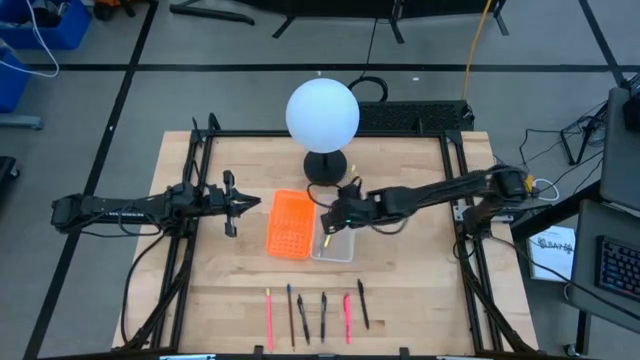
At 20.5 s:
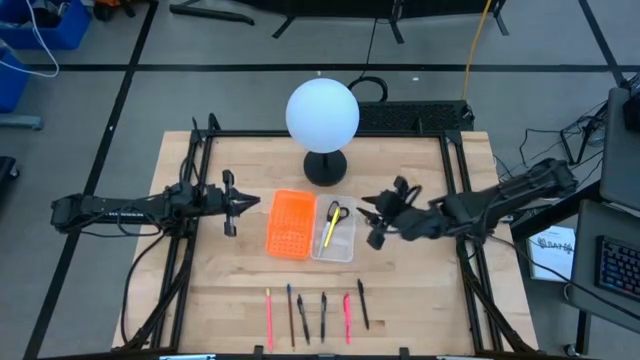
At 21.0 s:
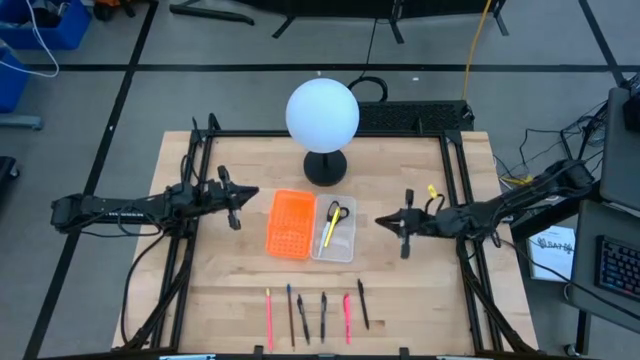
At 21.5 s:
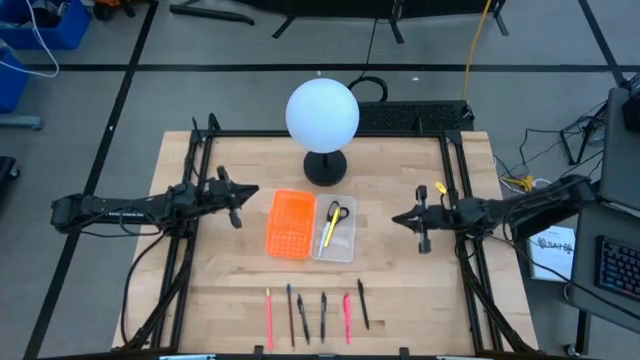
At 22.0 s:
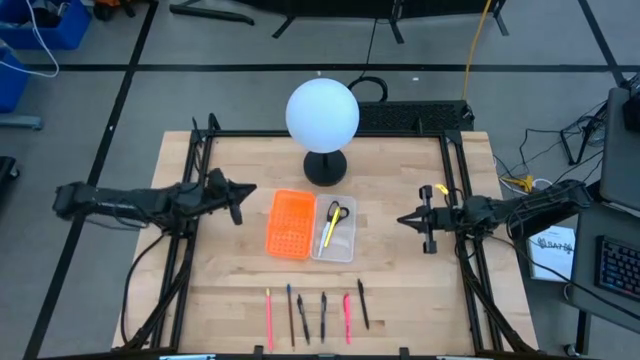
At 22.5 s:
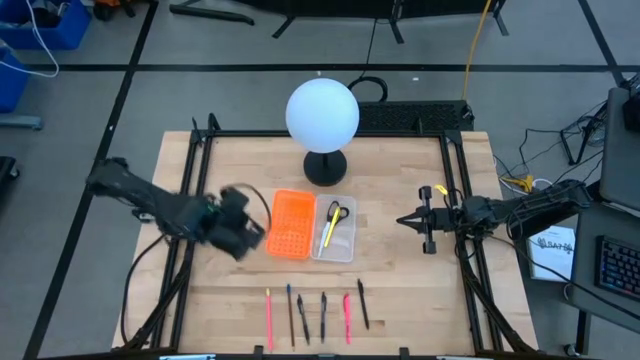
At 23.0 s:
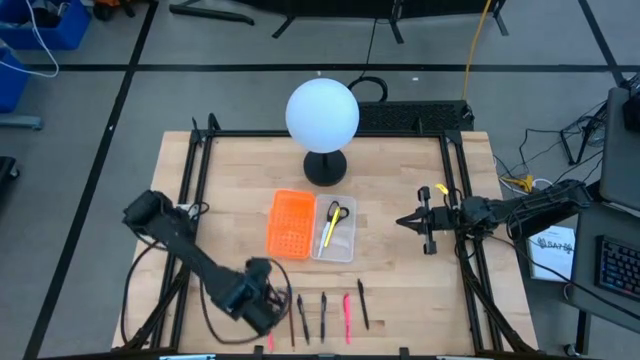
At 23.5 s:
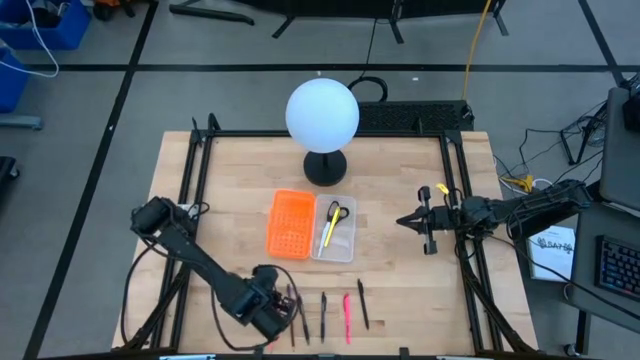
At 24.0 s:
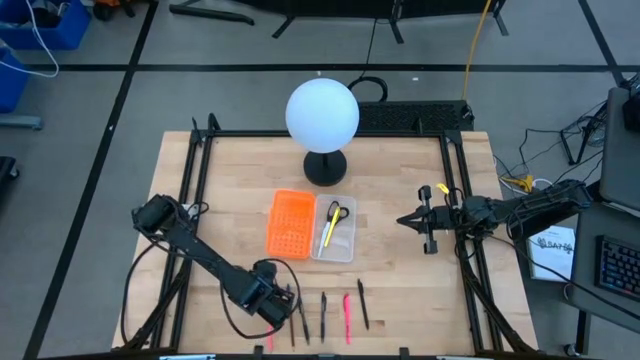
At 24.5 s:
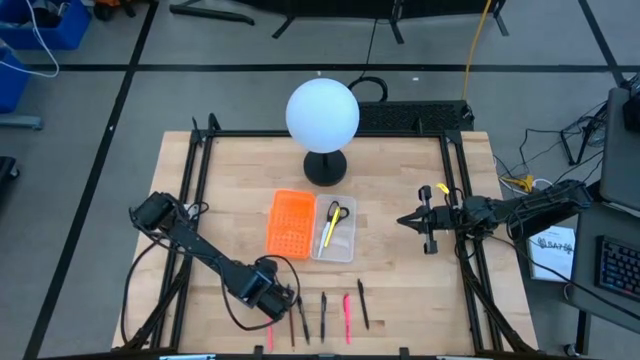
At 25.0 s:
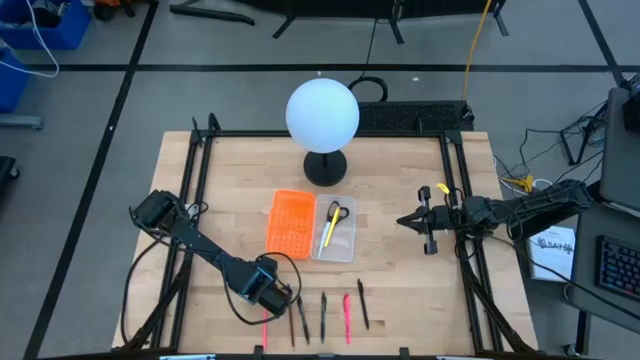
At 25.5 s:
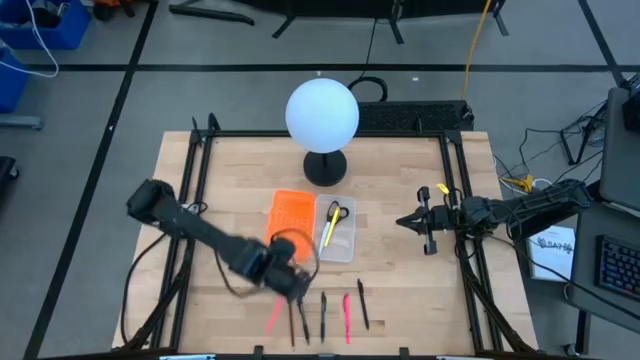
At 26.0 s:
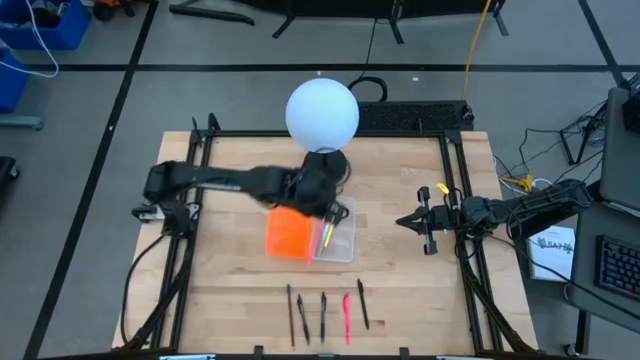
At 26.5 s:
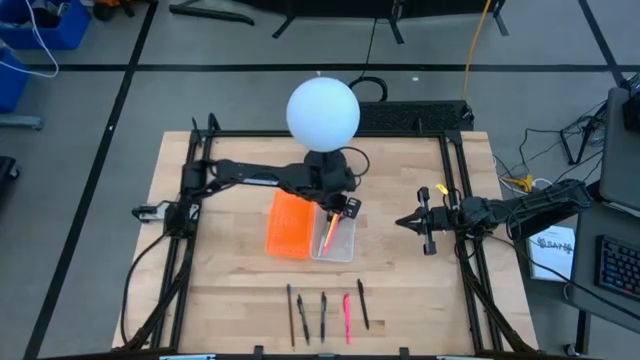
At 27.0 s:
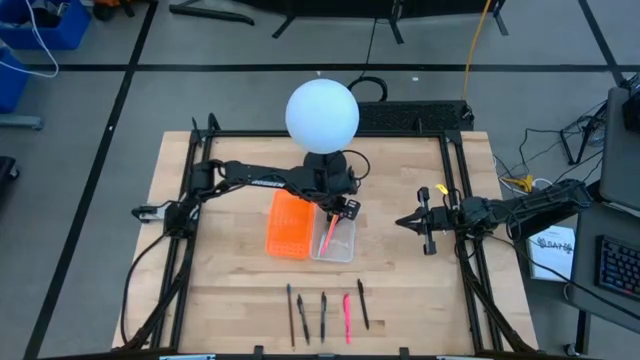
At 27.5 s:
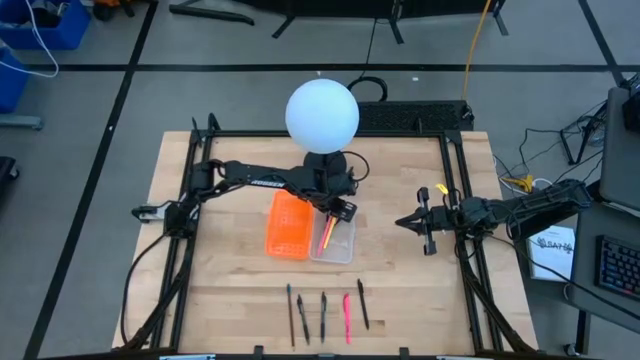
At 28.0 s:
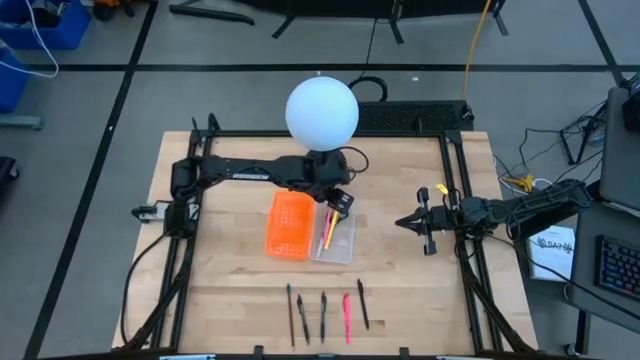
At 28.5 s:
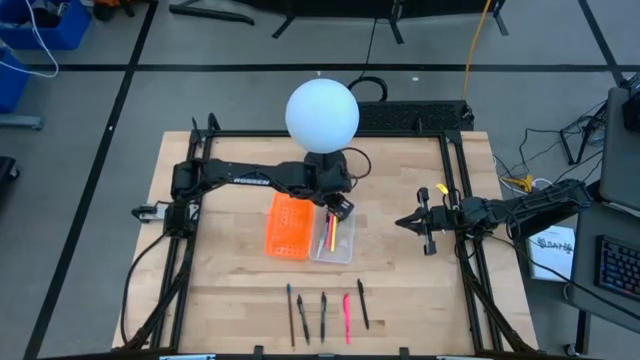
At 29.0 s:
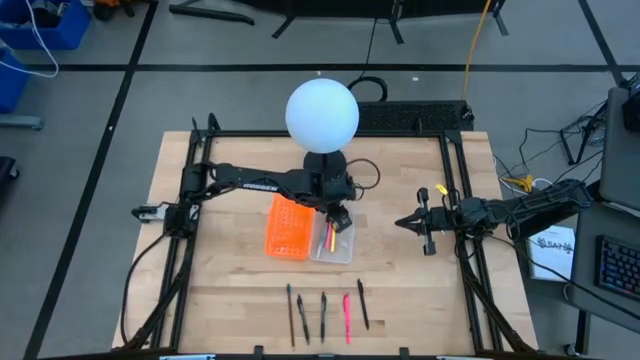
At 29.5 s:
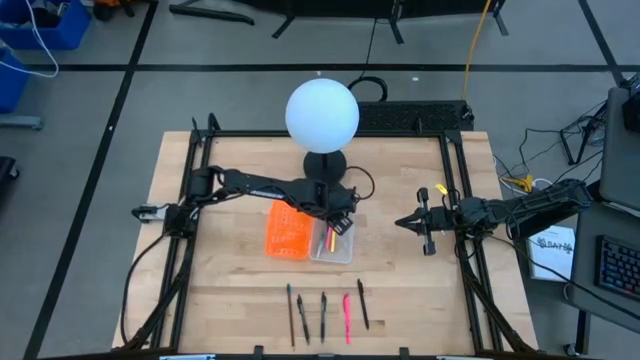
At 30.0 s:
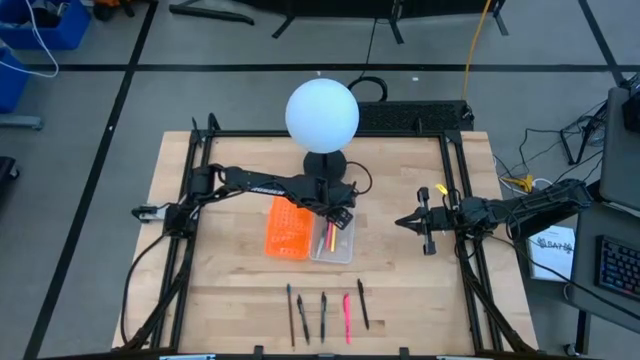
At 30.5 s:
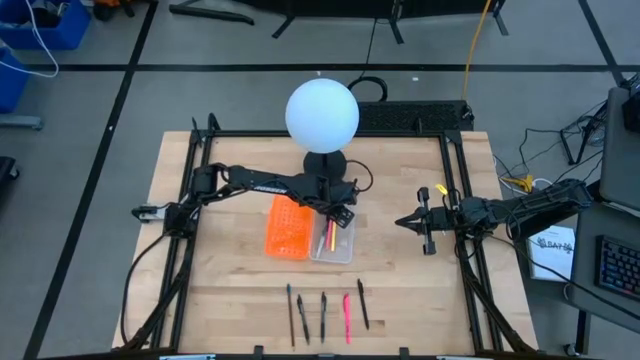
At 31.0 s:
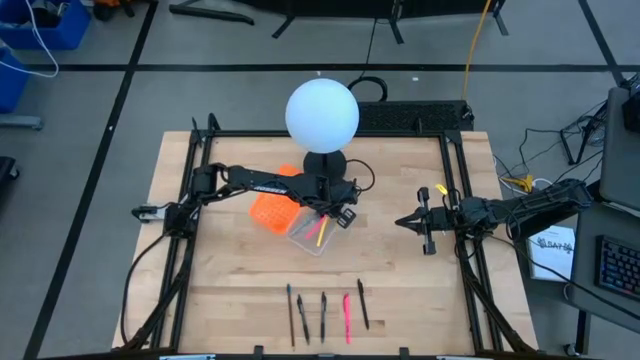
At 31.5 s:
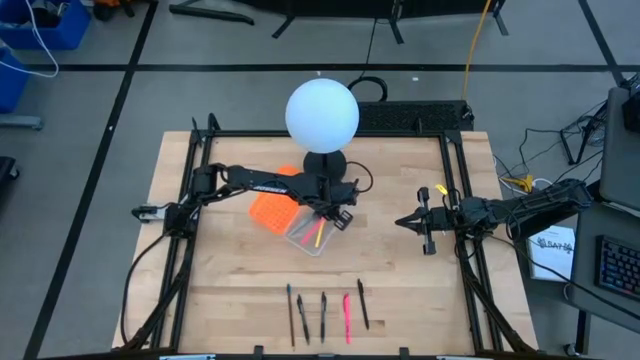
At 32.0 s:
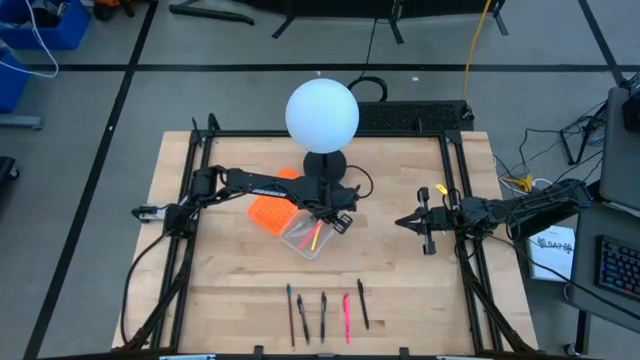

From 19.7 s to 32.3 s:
Task: Pick & place school supplies into a supply box
Put the pink pencil into the orange supply box

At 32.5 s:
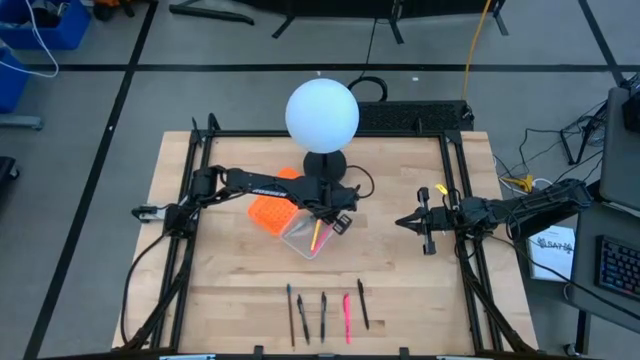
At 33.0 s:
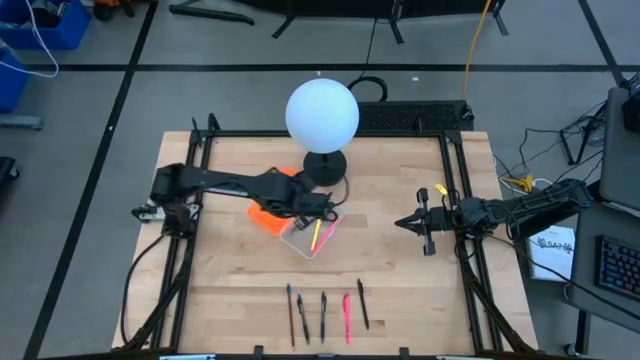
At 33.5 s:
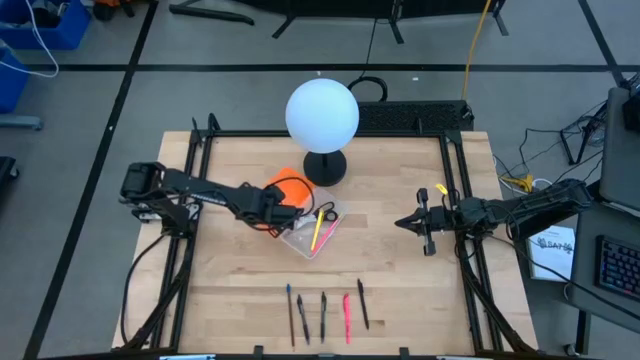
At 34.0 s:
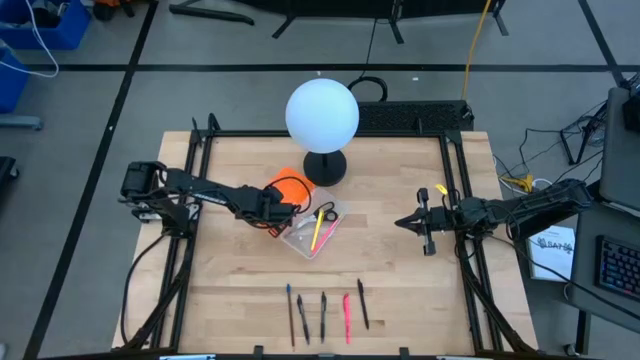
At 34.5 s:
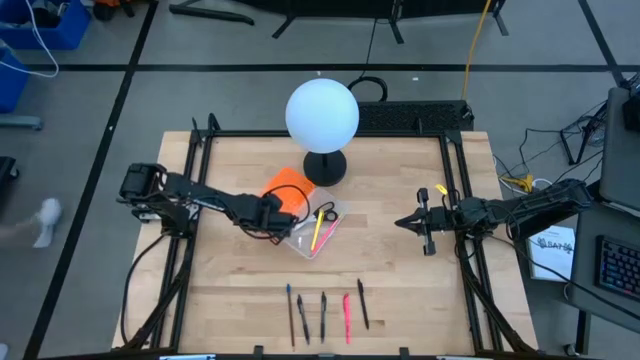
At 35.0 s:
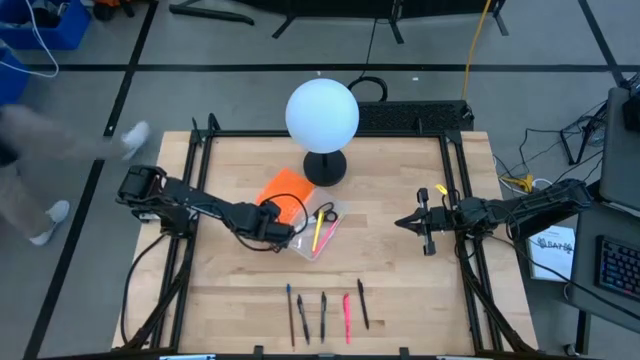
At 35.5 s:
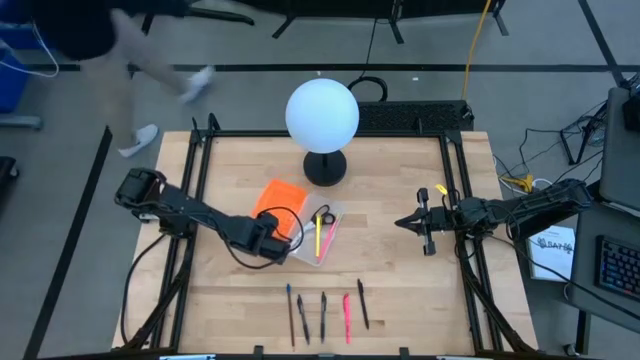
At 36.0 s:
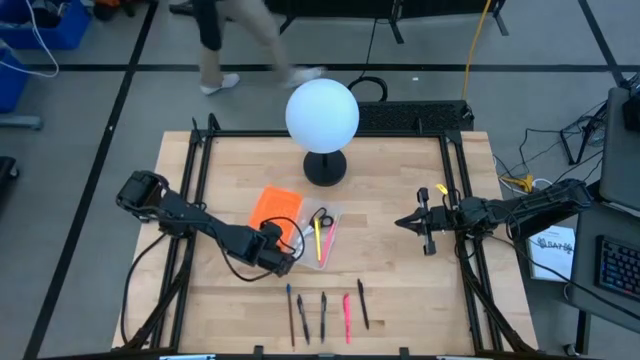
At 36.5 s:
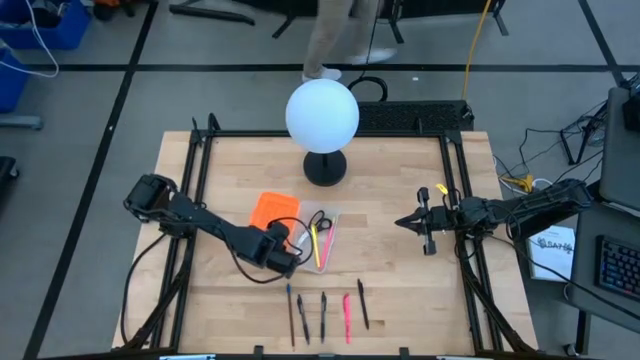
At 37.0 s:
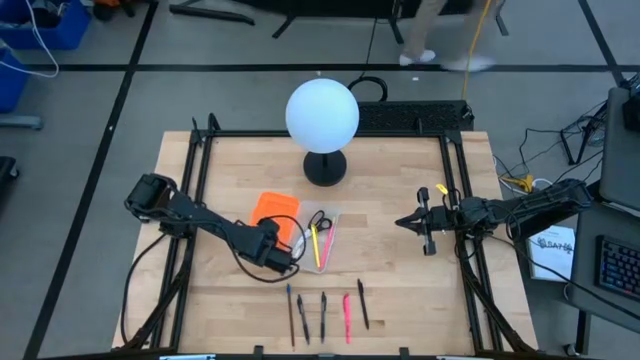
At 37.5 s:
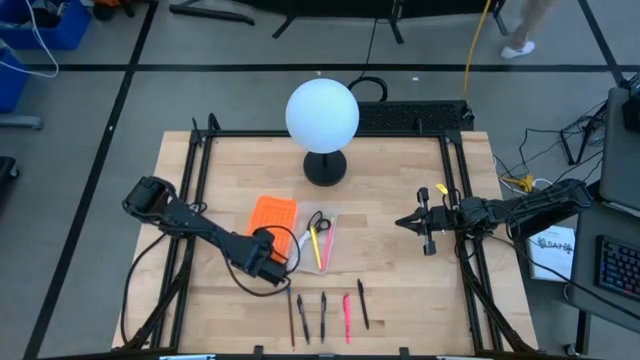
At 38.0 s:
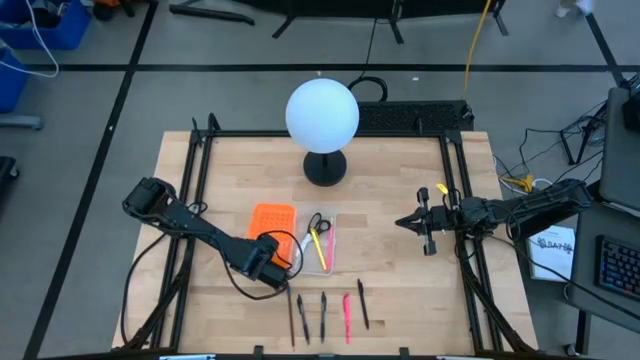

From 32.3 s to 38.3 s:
Adjust the supply box into its original position

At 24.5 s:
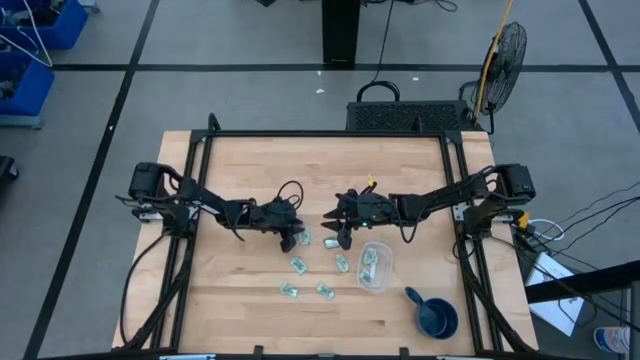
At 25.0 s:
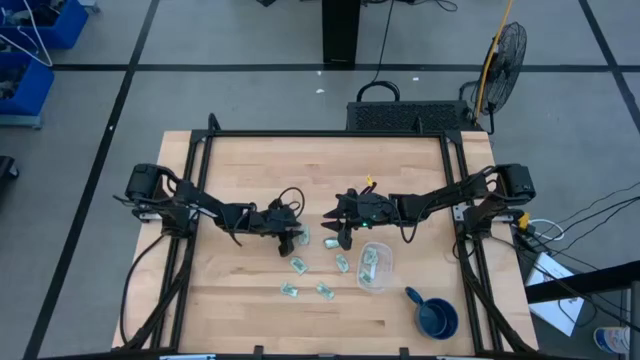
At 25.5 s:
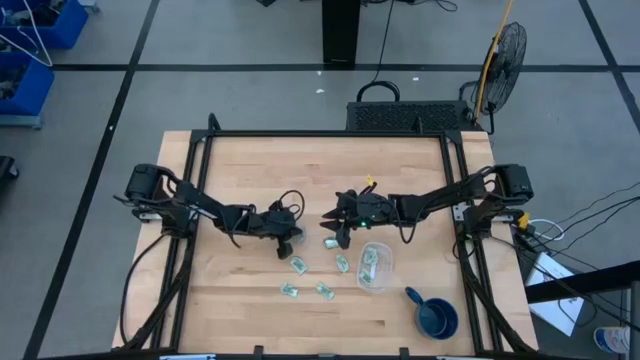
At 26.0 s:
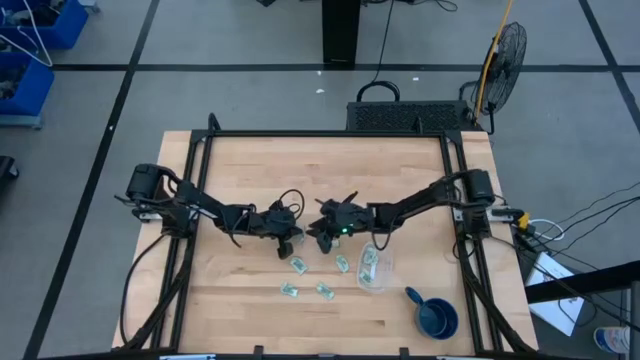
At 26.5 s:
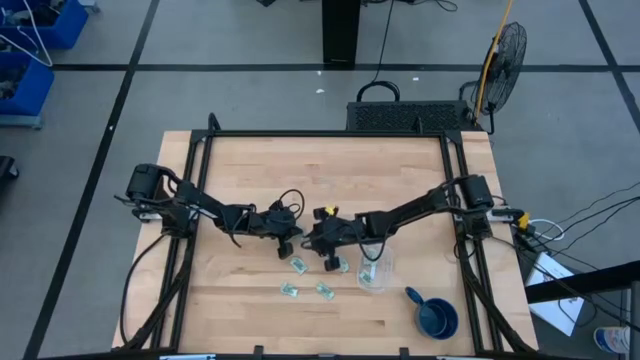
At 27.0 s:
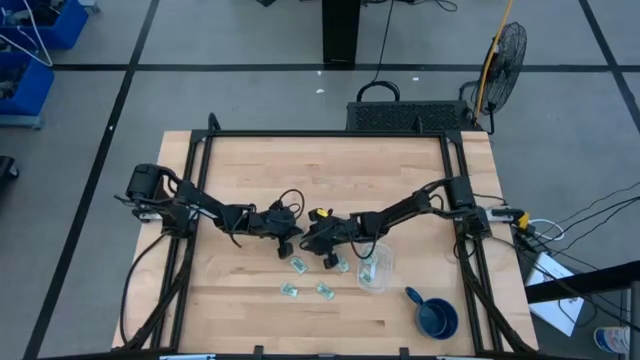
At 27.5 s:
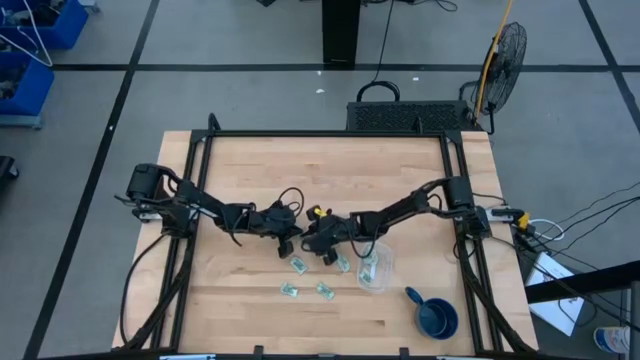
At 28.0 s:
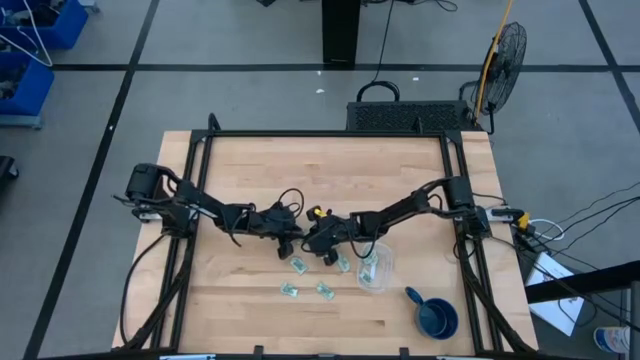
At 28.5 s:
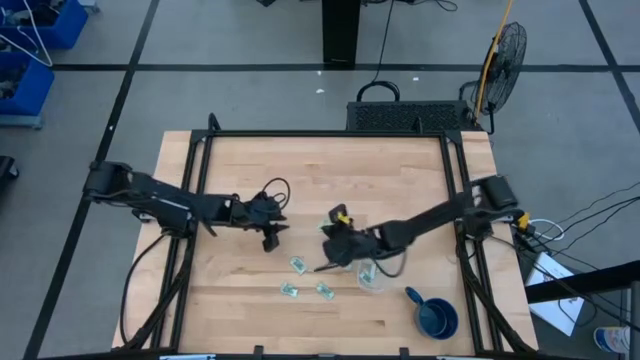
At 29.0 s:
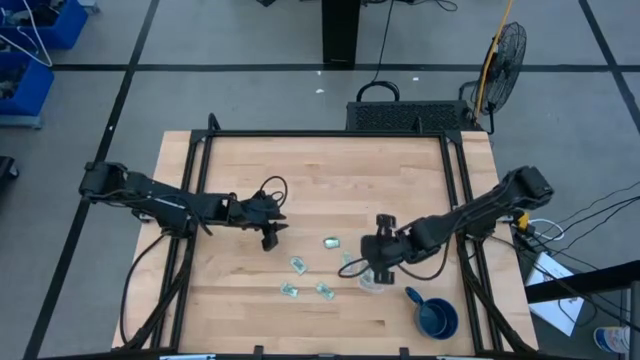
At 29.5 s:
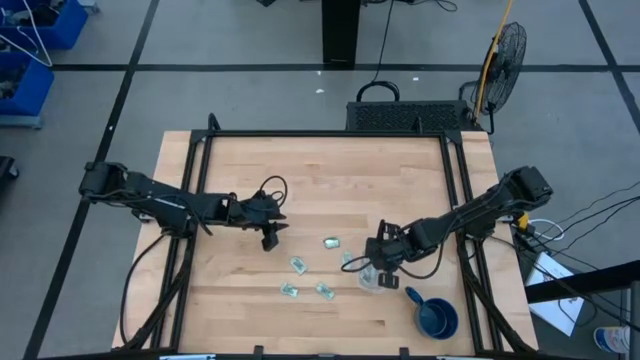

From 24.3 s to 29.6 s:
Task: Pick and place Stevia / Truvia into bins
Put the stevia packet into the transparent container
